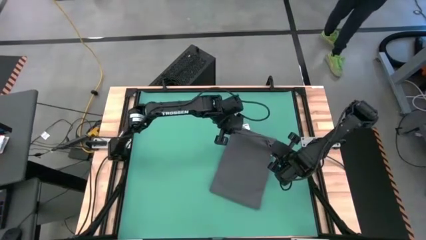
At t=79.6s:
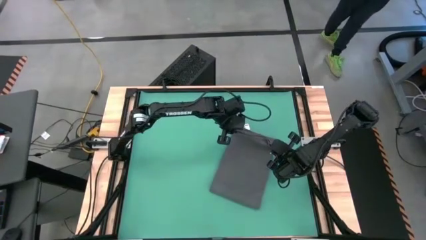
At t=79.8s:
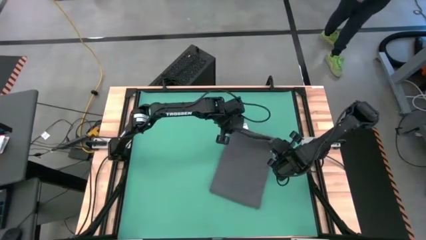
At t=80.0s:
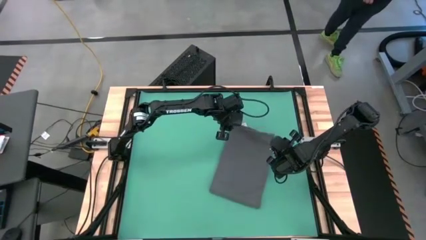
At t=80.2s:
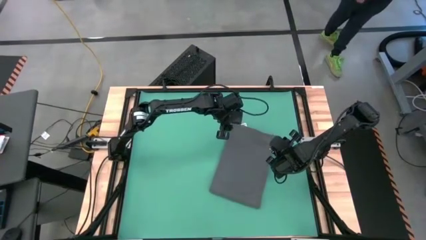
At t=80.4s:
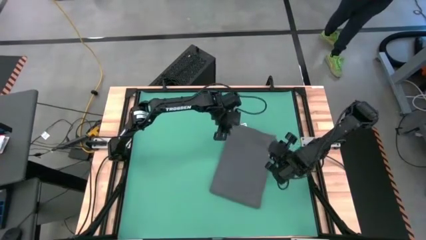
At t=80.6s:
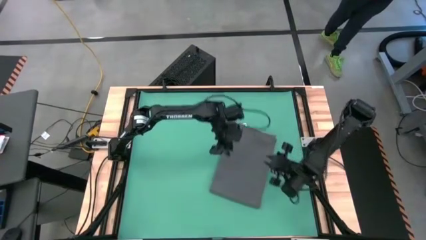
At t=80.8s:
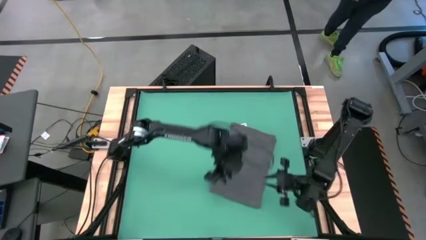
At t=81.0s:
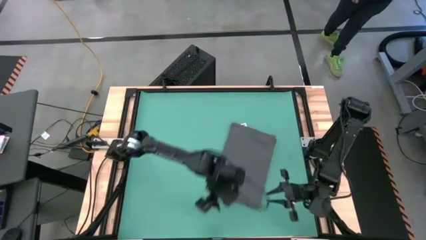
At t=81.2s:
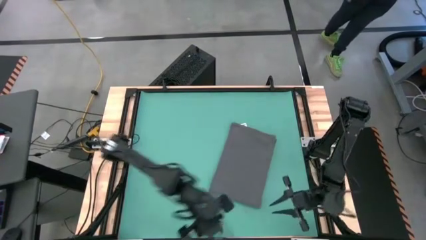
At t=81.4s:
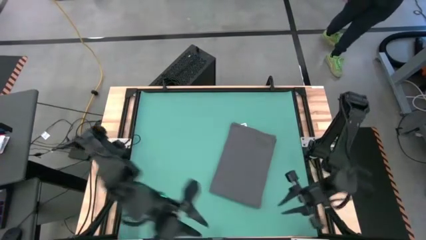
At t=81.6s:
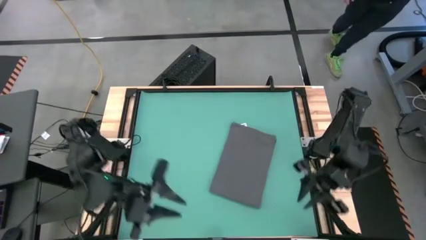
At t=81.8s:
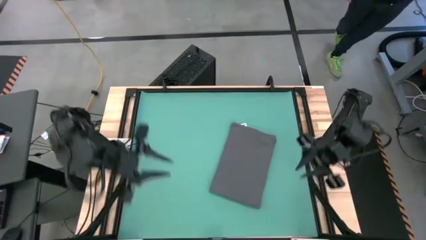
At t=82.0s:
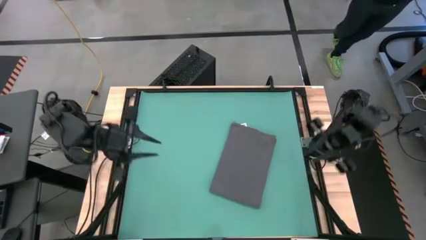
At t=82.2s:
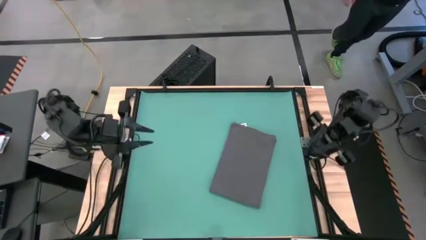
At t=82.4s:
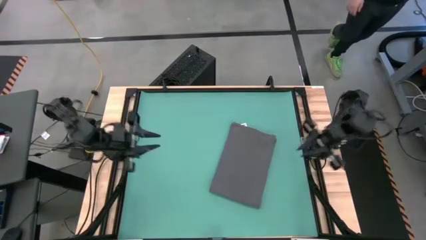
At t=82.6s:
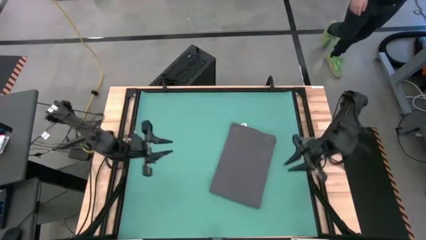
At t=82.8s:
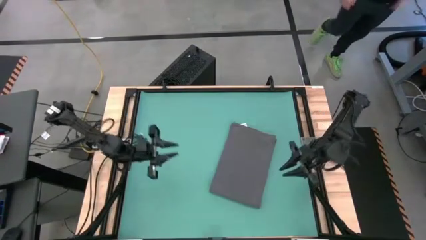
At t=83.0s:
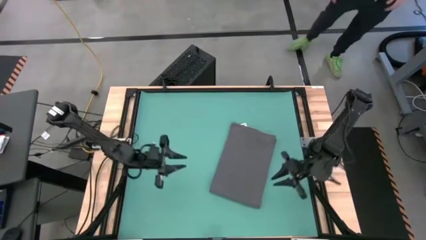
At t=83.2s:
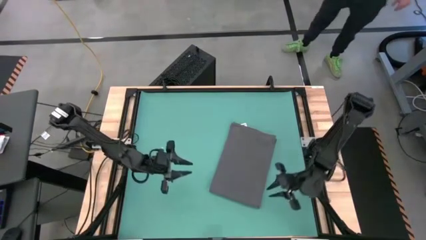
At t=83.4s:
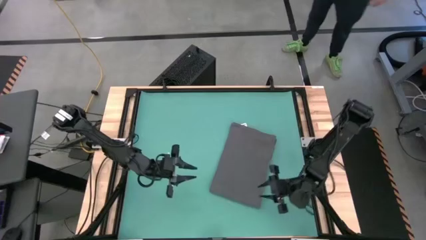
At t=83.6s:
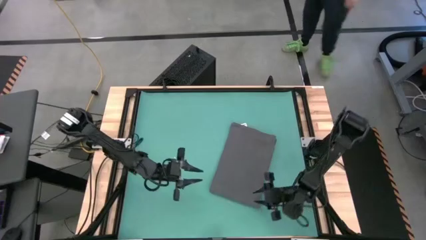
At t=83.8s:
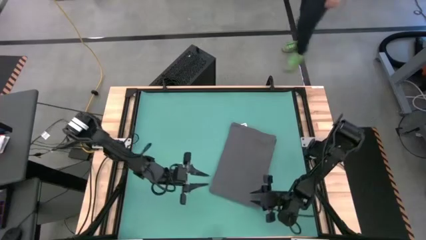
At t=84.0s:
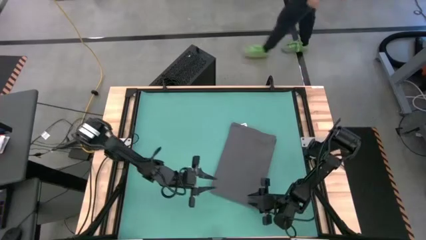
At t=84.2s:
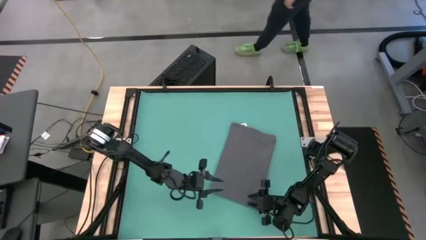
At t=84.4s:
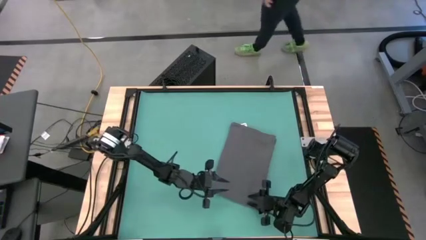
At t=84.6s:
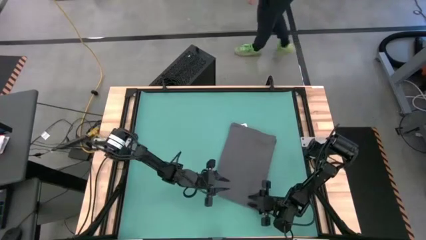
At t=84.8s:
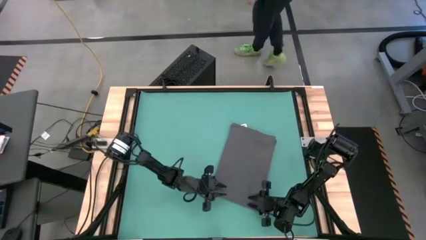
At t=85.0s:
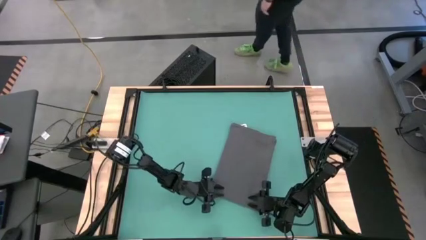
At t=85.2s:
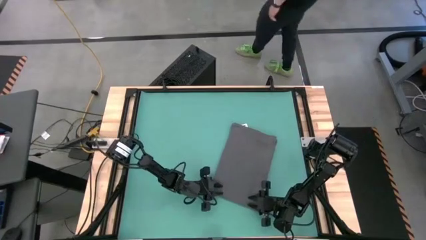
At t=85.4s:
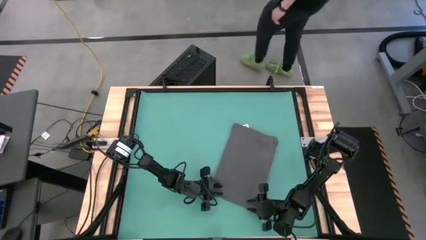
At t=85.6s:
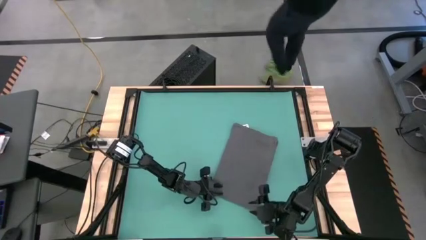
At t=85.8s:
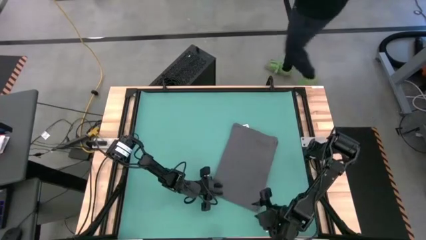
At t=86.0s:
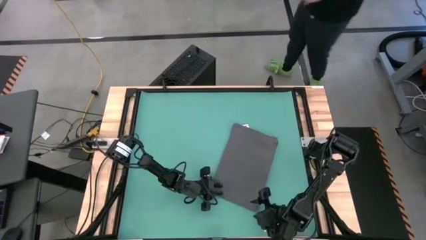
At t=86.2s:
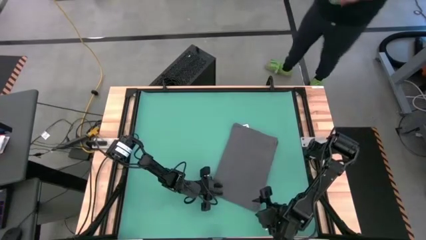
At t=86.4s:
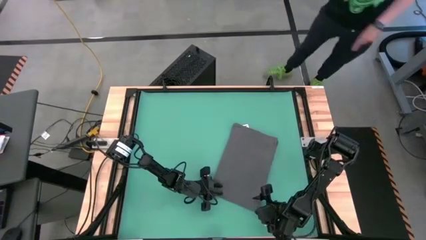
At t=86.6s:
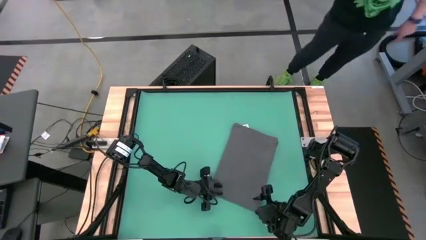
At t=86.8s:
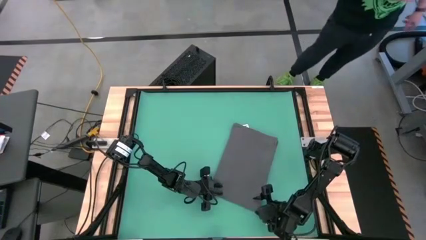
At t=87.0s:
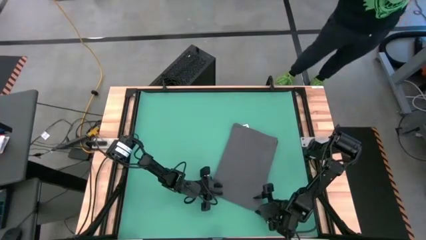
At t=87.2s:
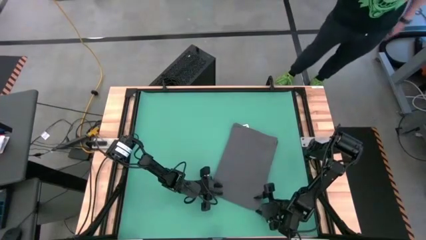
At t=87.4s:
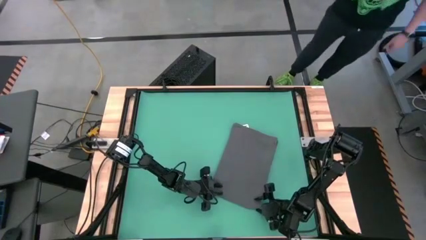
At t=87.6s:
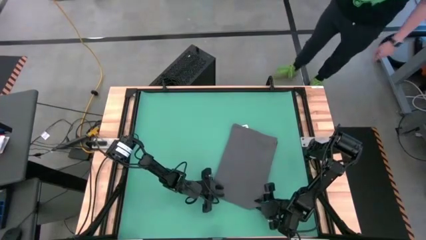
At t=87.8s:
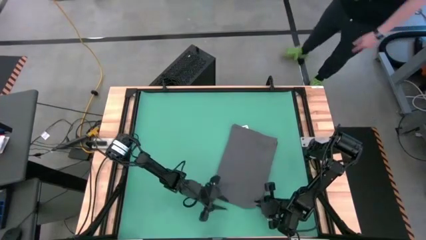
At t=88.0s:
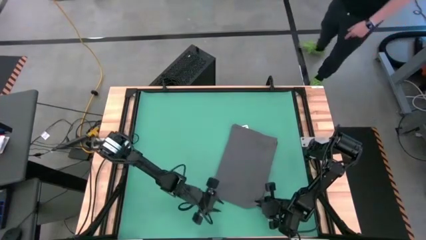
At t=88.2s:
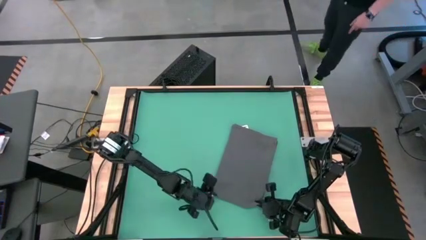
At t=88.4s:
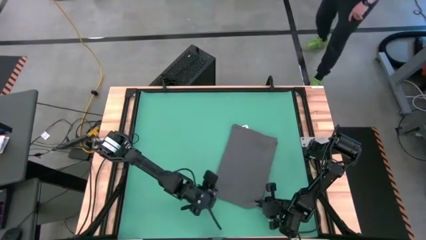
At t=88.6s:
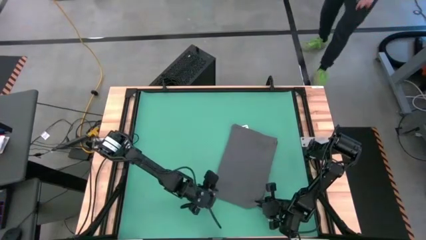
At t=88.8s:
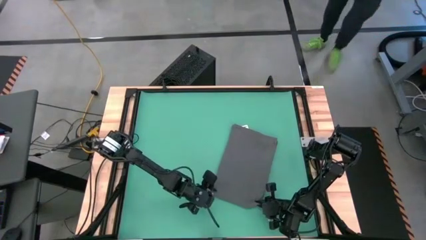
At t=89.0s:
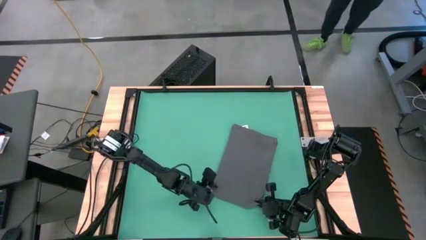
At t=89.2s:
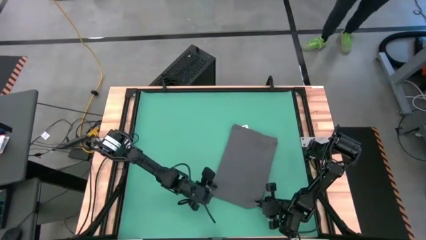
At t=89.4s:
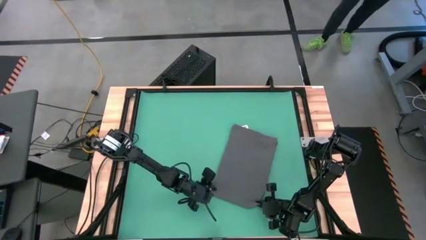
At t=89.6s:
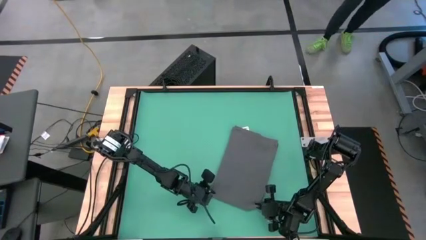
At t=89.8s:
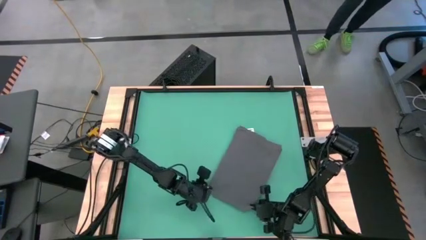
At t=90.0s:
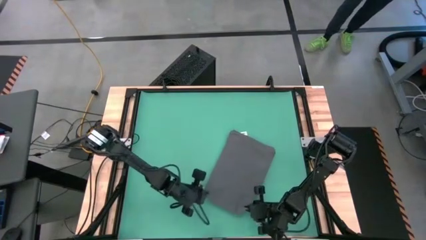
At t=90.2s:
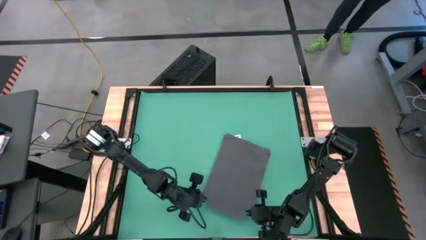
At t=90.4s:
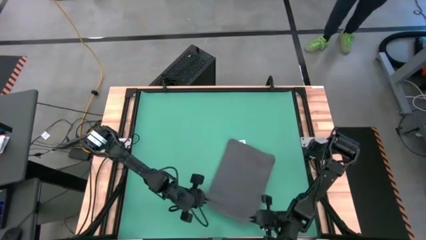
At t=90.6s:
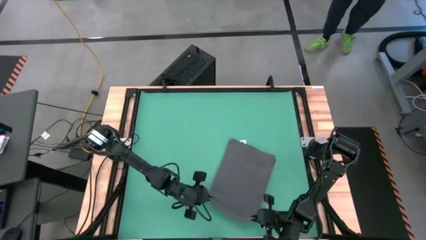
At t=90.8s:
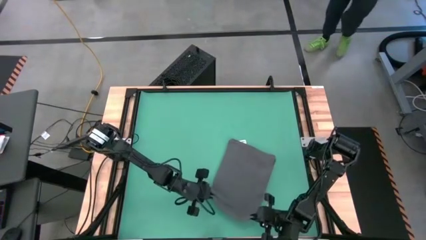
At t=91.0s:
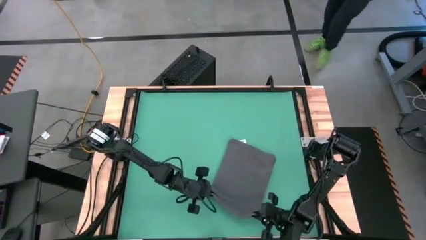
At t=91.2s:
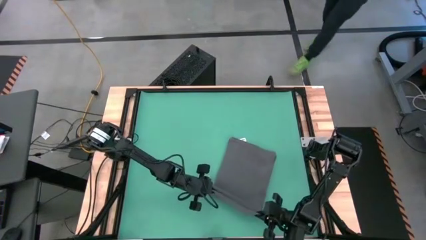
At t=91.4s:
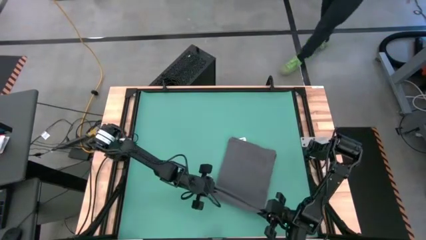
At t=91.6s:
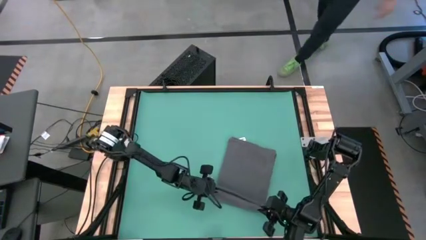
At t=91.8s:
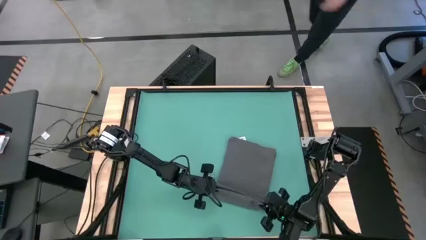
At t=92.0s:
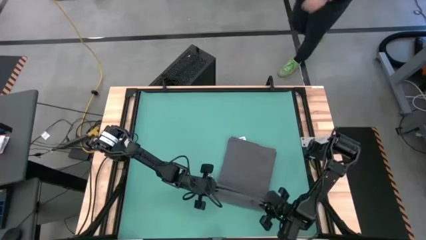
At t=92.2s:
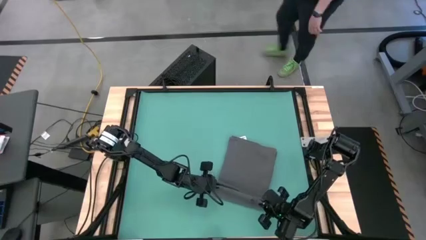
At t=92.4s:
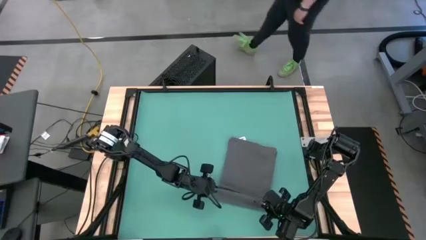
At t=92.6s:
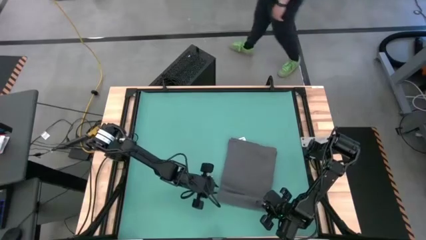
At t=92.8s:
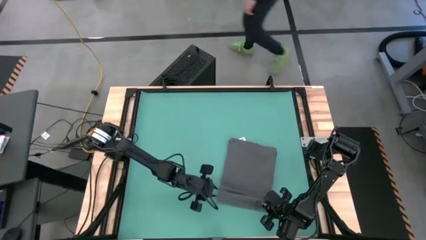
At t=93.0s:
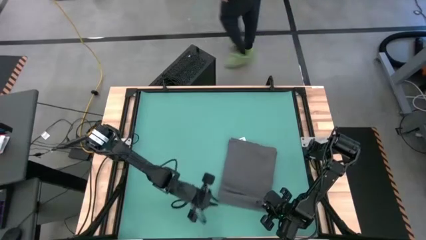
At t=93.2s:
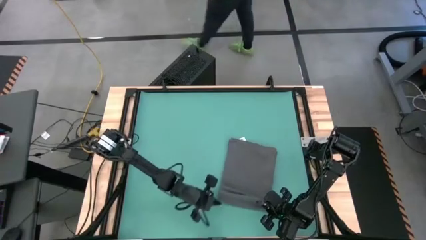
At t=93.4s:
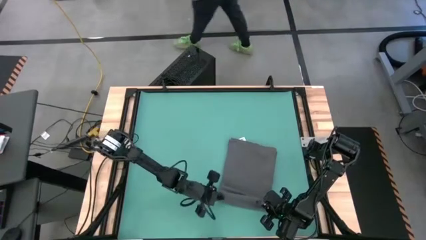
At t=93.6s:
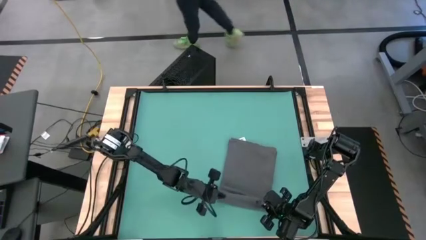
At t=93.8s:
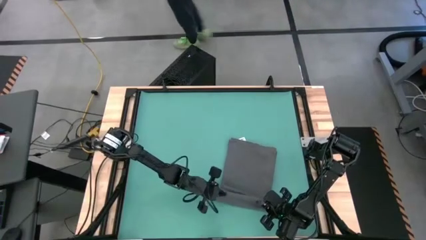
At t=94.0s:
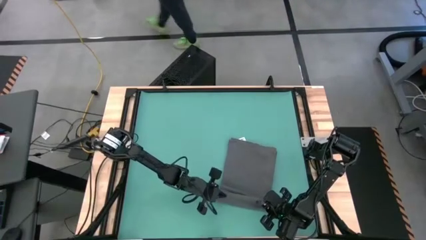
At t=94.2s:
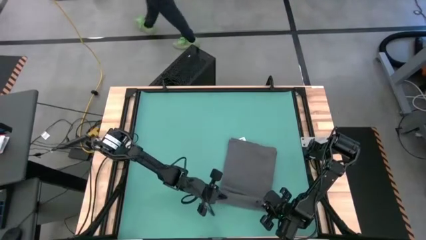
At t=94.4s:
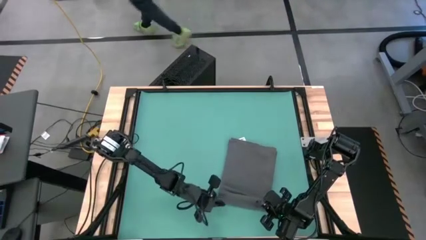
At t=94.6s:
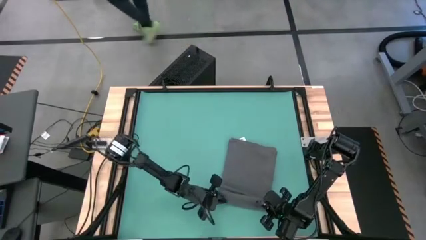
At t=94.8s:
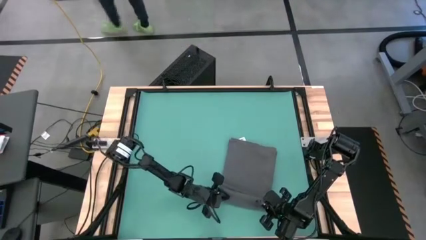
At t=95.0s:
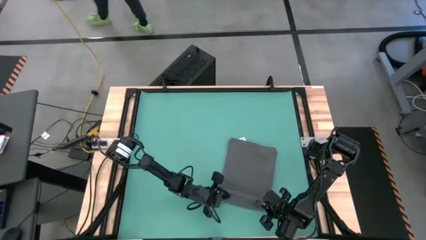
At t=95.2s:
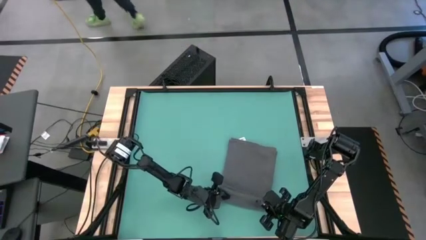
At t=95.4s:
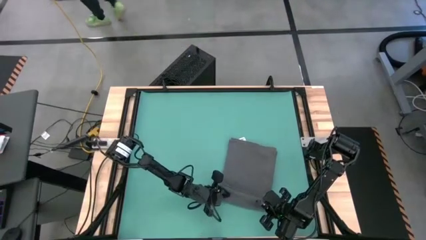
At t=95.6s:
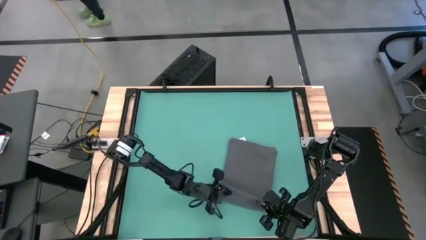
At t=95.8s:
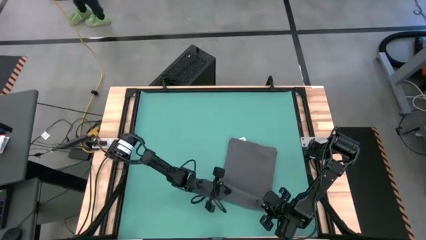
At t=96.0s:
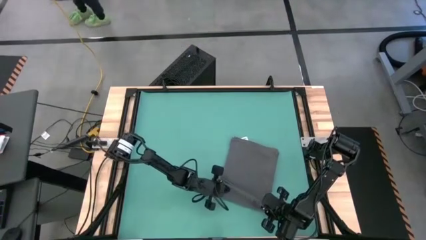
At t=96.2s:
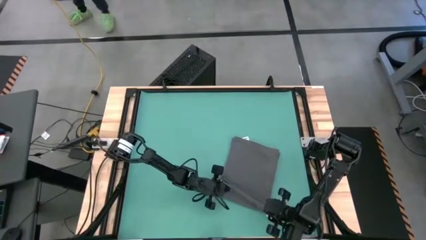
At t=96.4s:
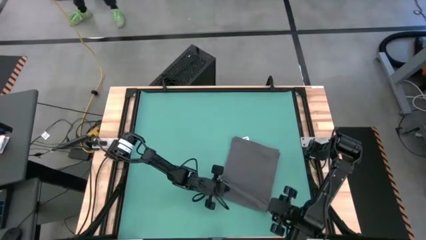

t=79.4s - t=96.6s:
Task: Roll towel
Roll the gray towel
